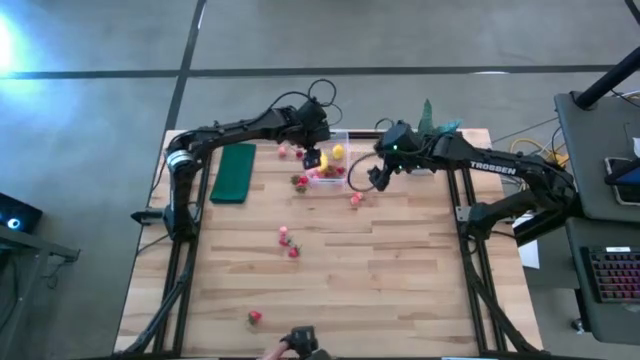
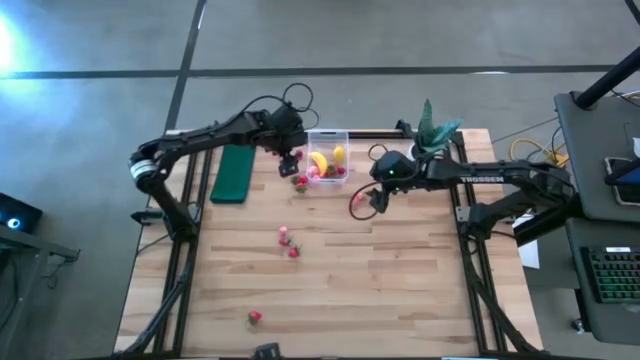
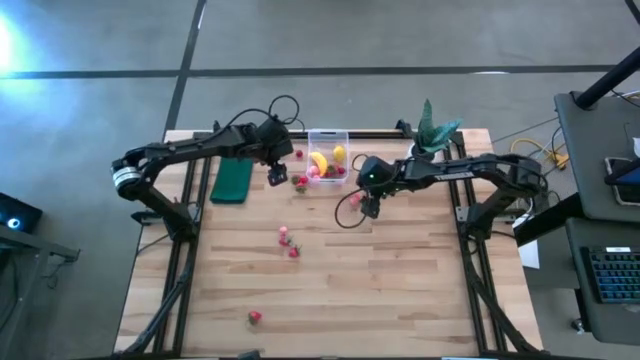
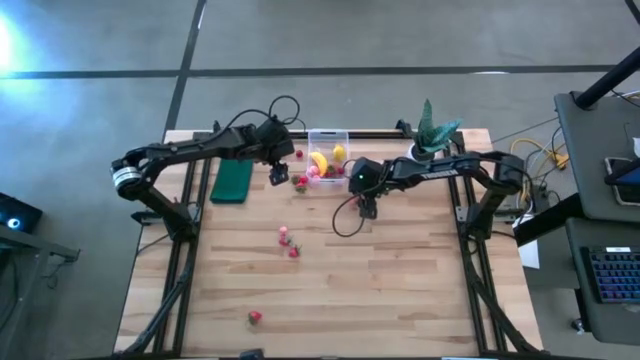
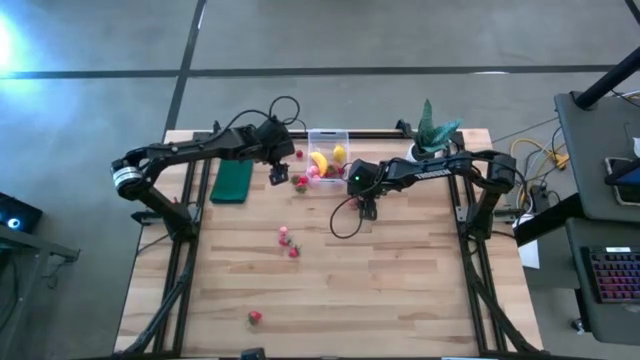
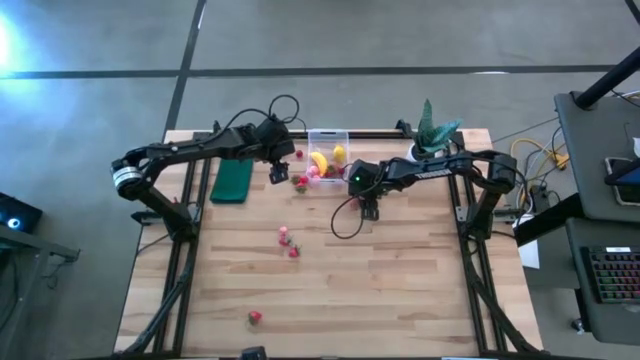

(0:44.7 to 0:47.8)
Task: Pick and placing Produce into tupperware
Put the pink peach into the transparent bin

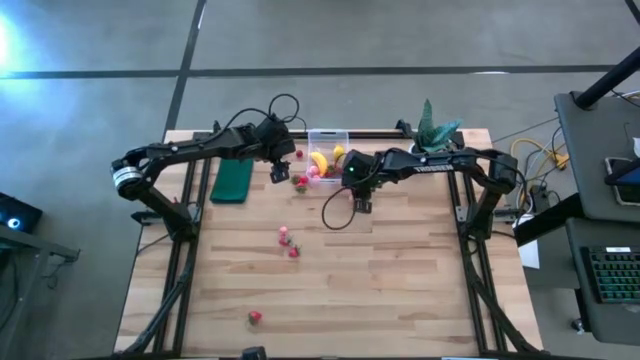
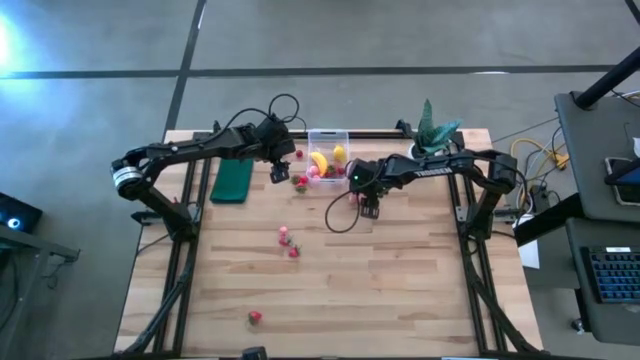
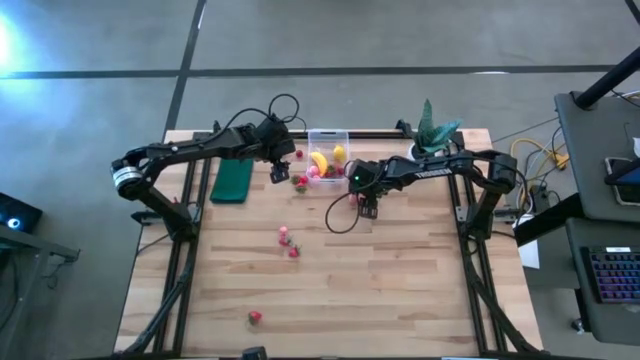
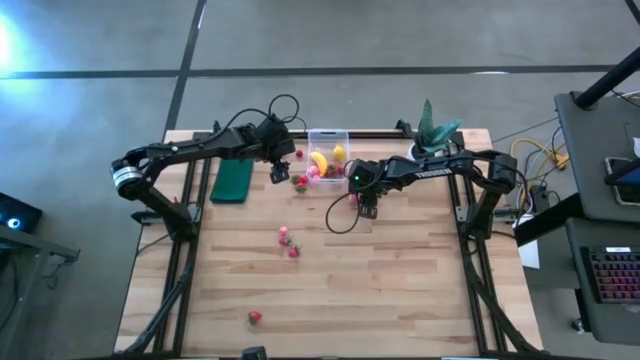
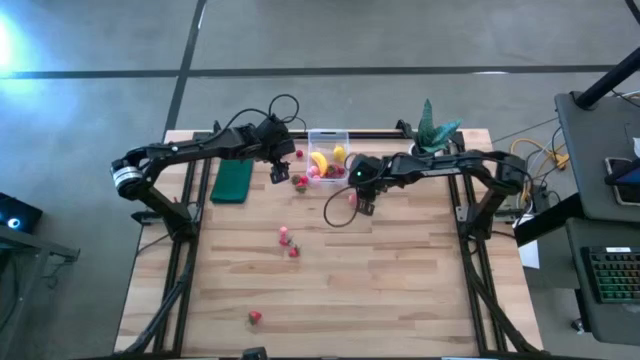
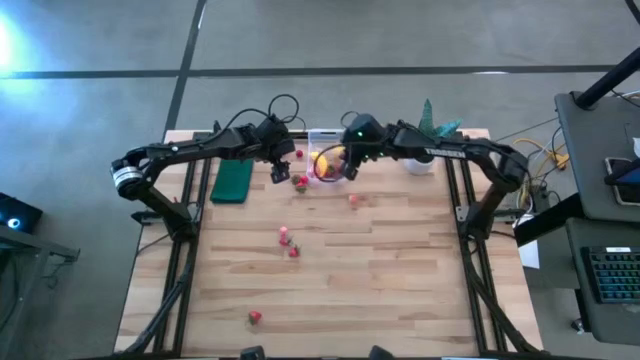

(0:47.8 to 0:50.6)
Put the pink peach into the transparent bin

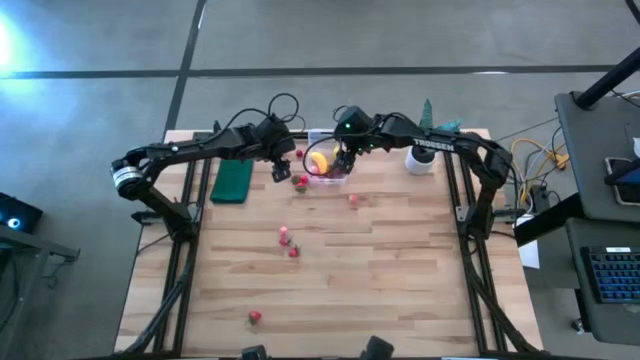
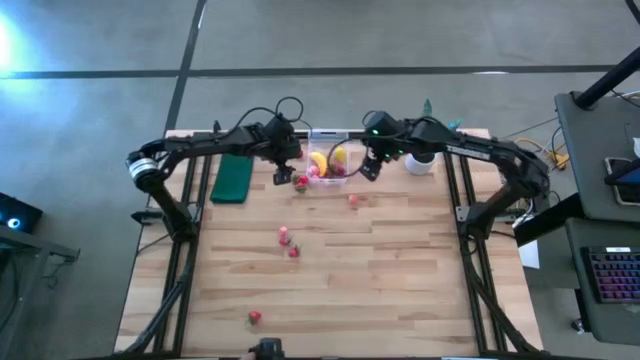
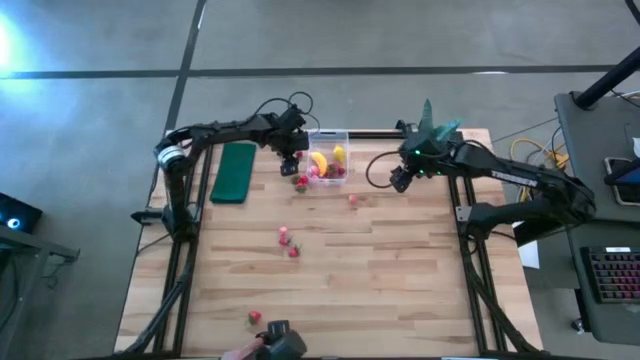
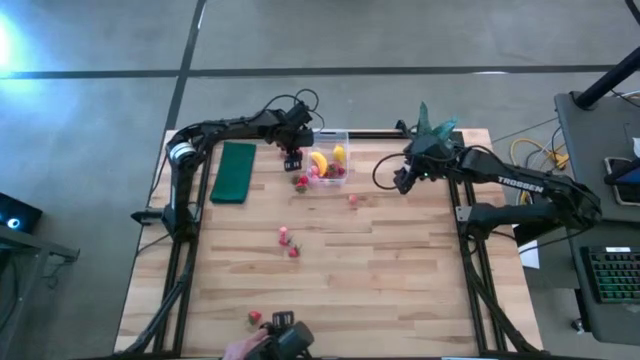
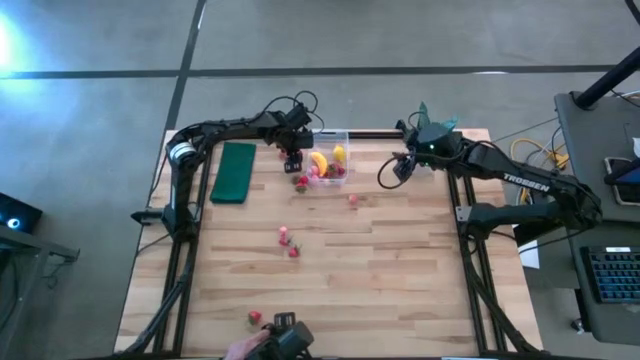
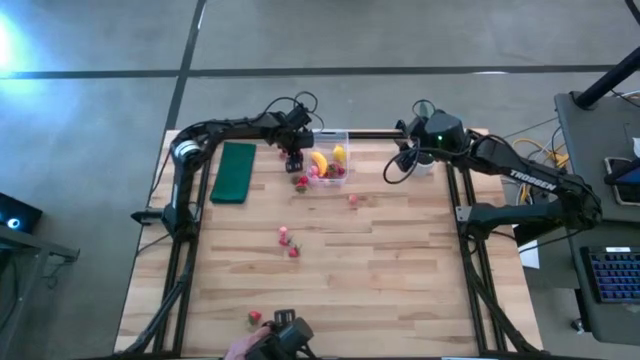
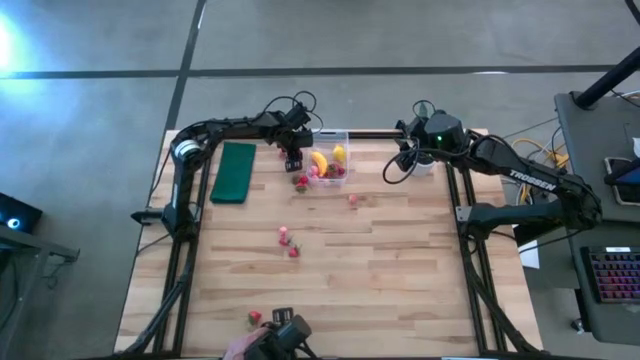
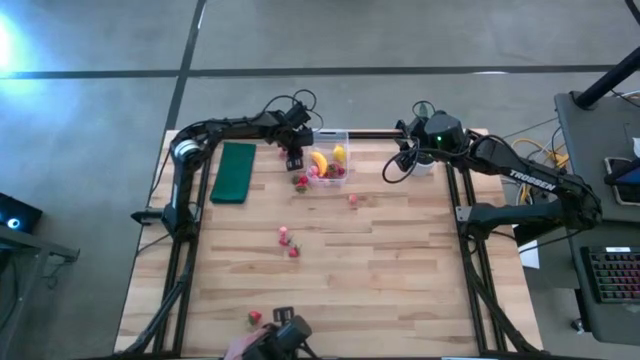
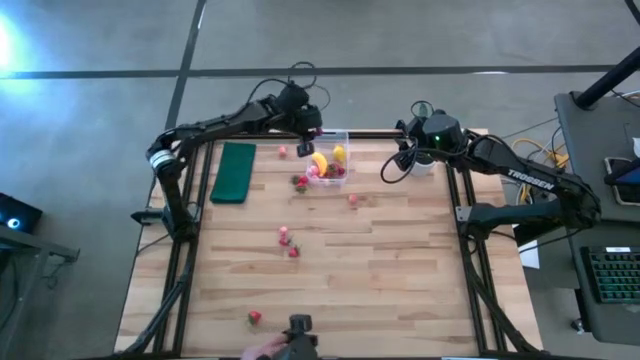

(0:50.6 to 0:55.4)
Put the red cherry into the transparent bin

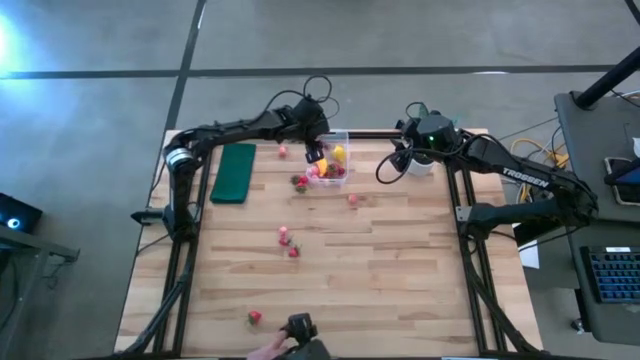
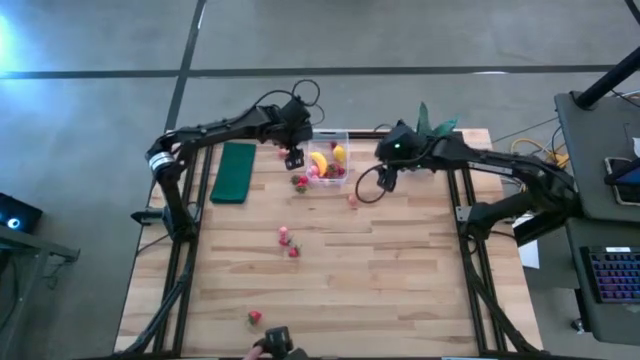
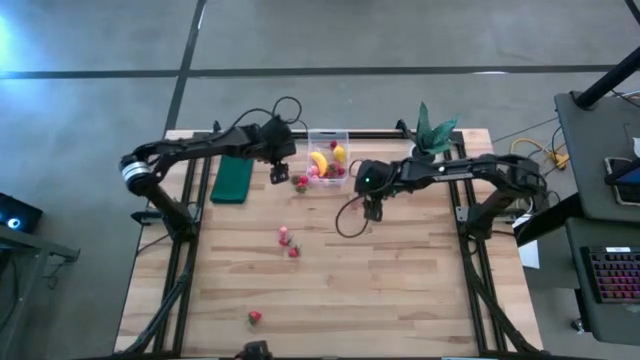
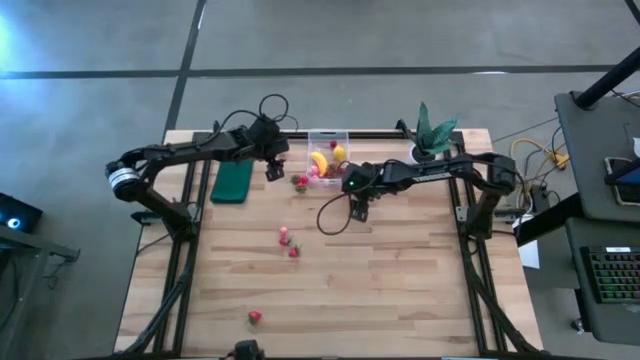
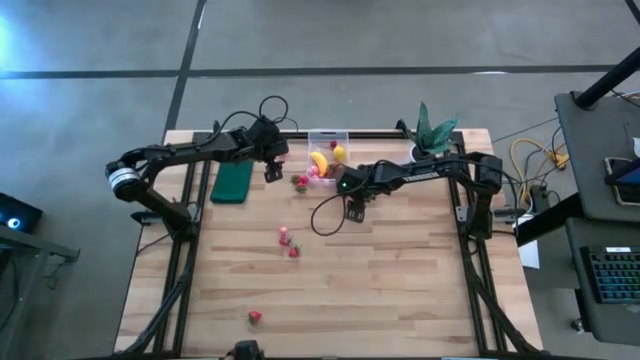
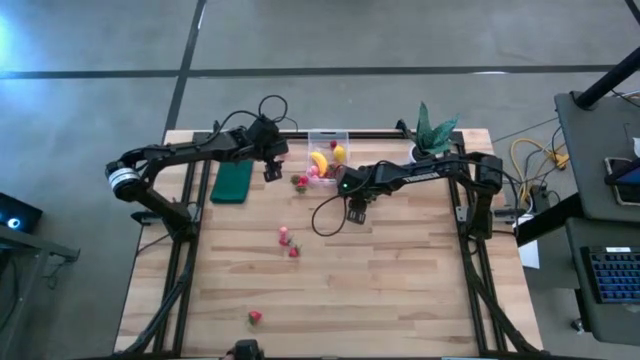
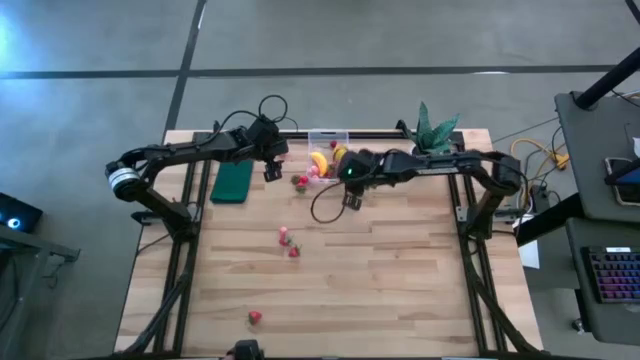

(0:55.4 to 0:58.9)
Put the pink peach into the transparent bin

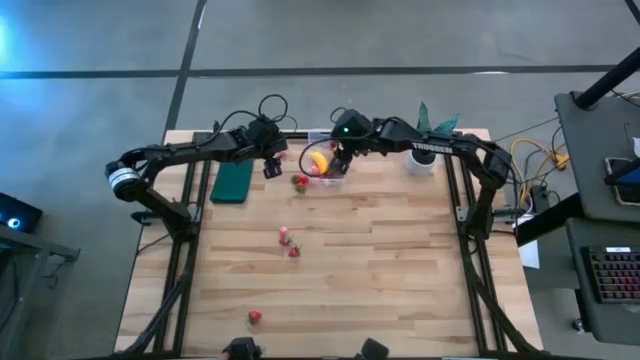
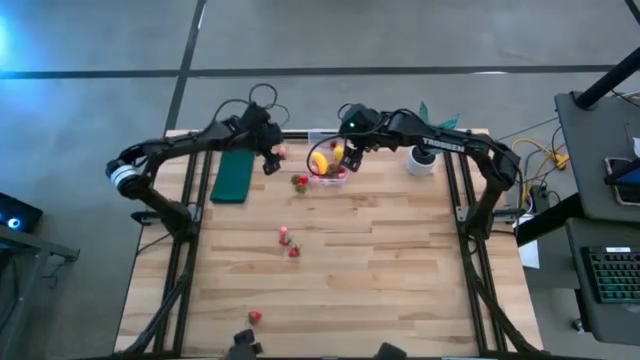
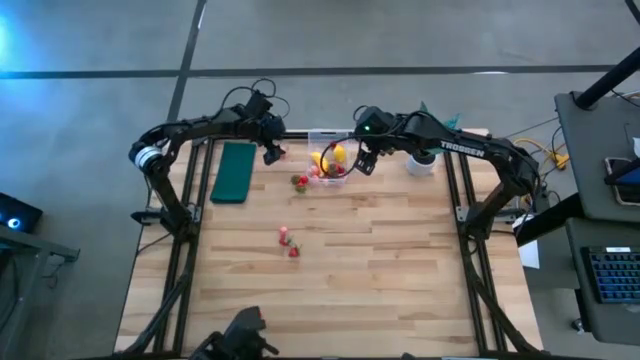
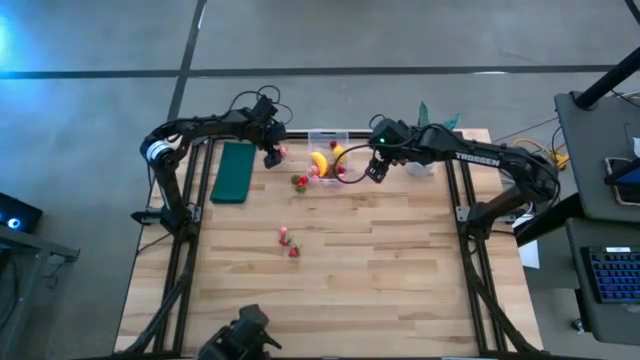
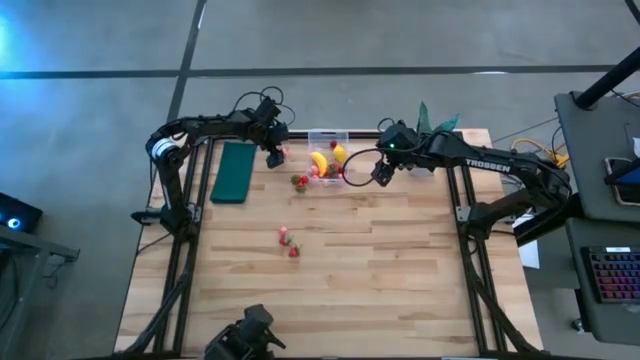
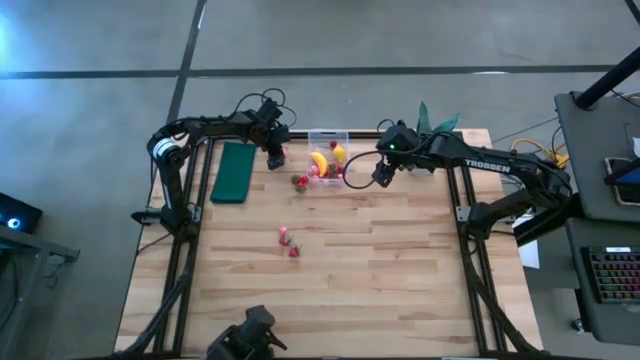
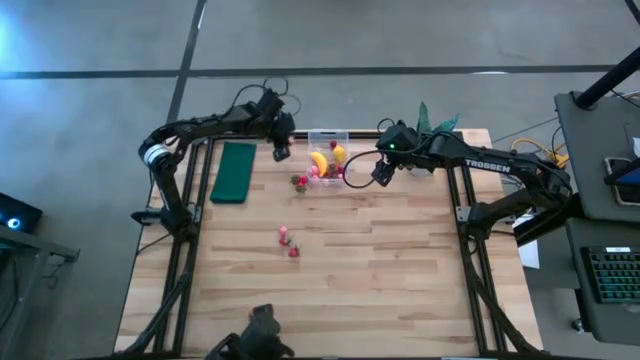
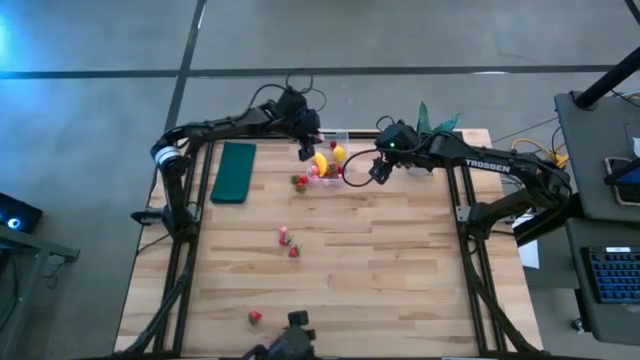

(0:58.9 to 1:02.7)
Put the pink peach into the transparent bin

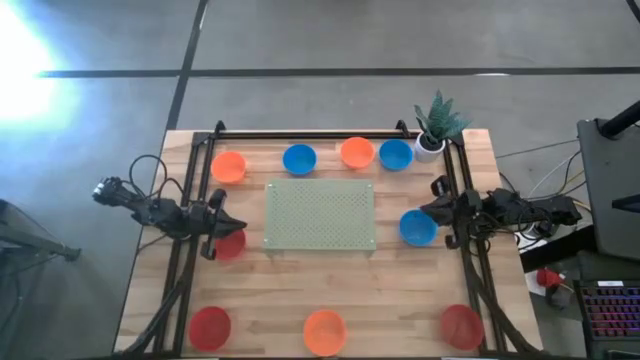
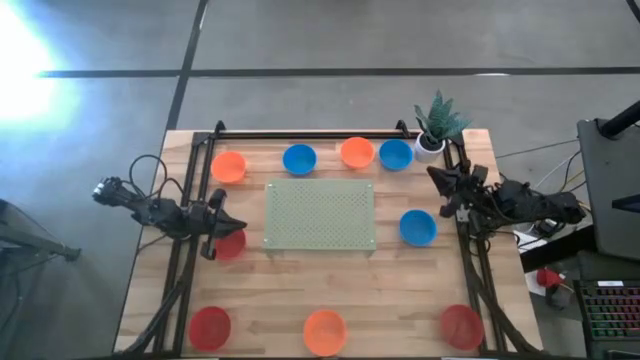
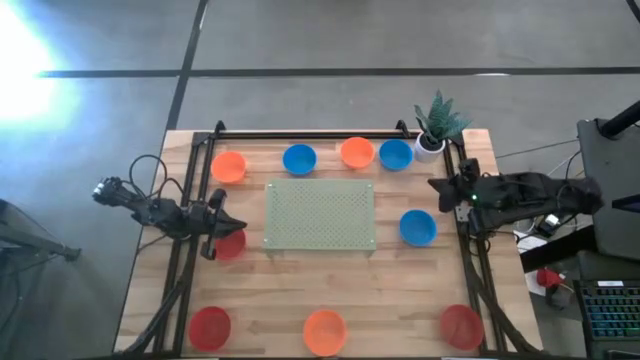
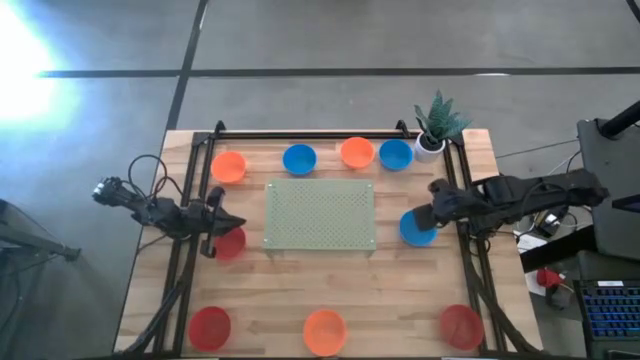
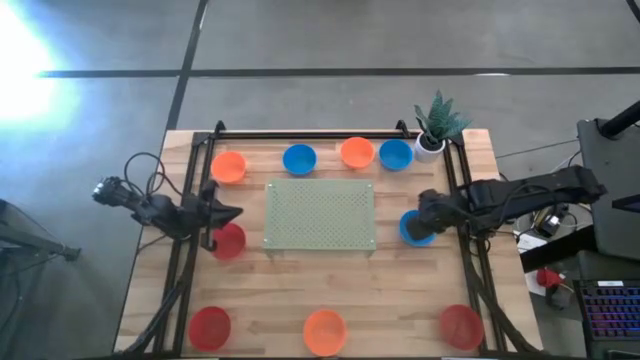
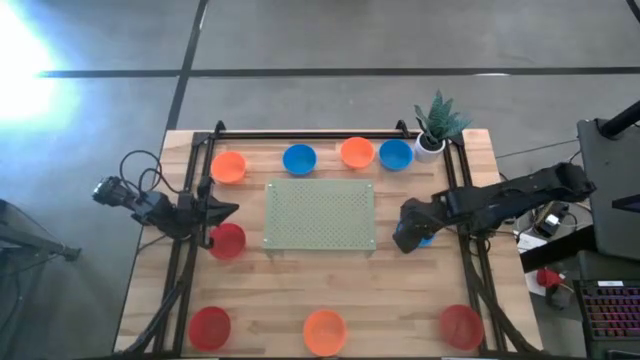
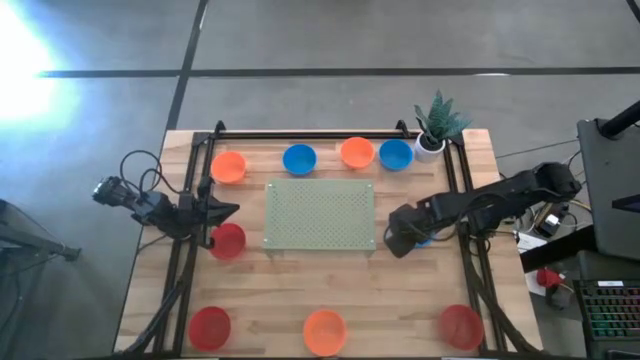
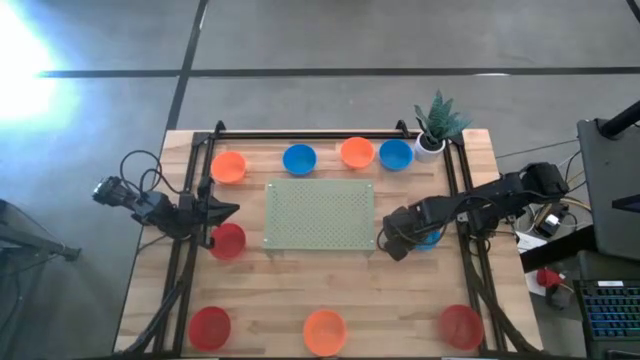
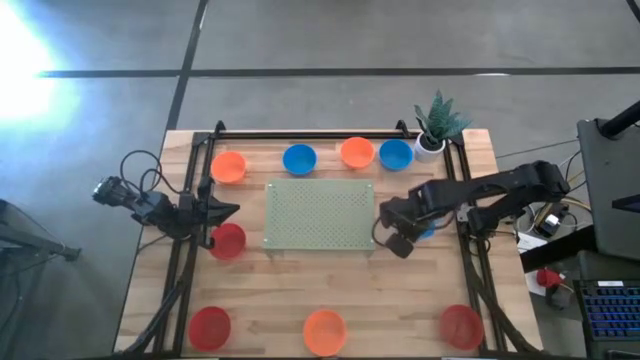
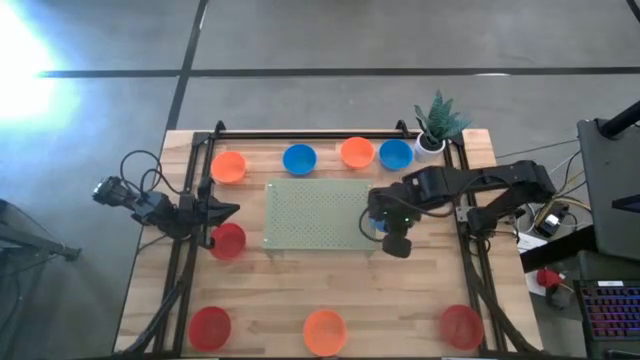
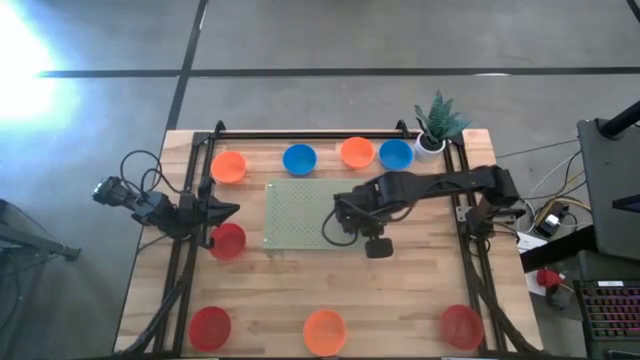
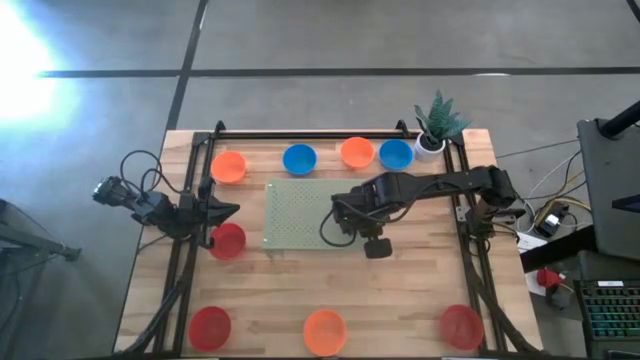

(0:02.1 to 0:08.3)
Task: Pick & Place Mini bowls
Put the bottom blue bowl on the shelf
